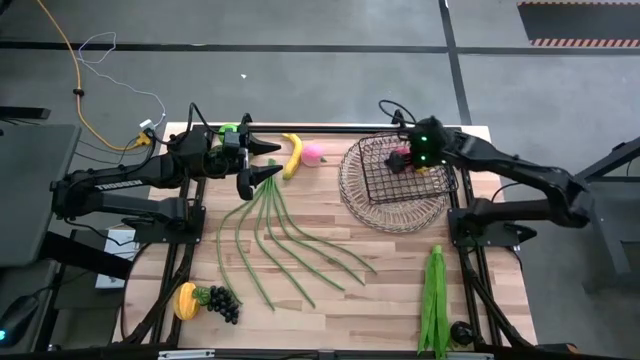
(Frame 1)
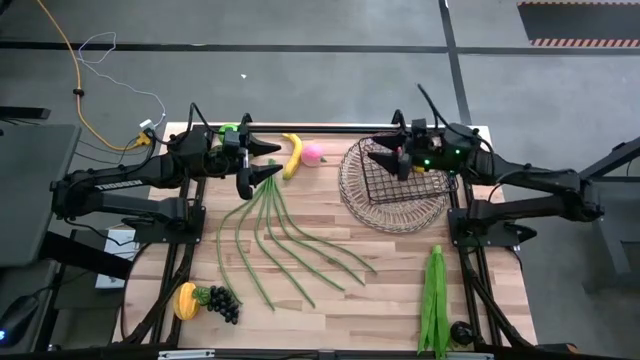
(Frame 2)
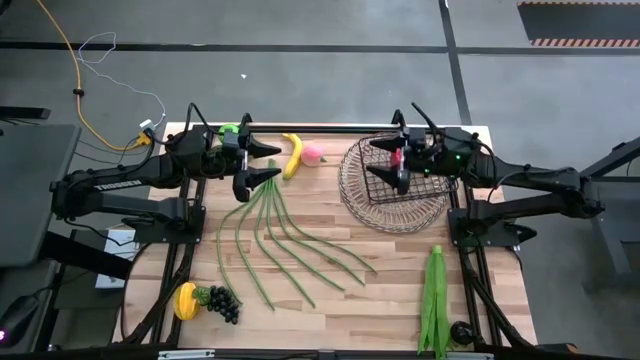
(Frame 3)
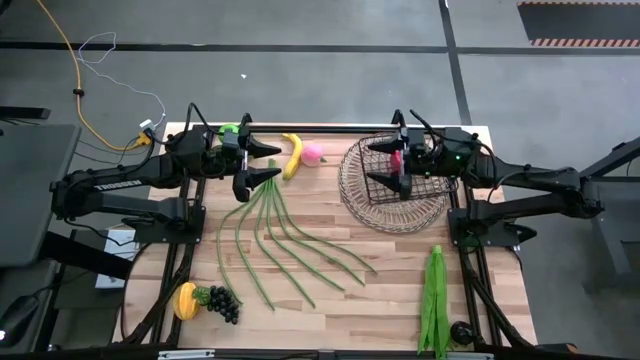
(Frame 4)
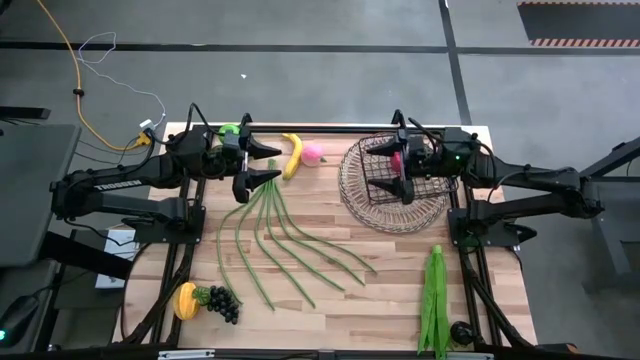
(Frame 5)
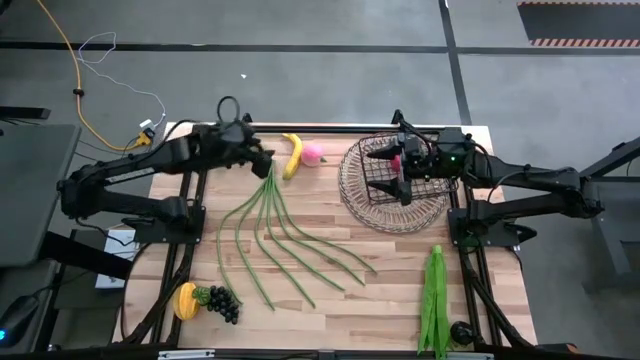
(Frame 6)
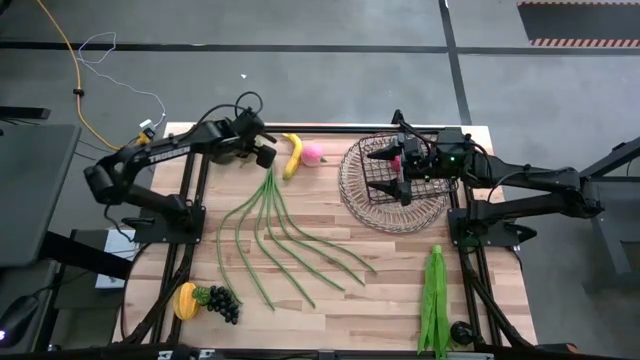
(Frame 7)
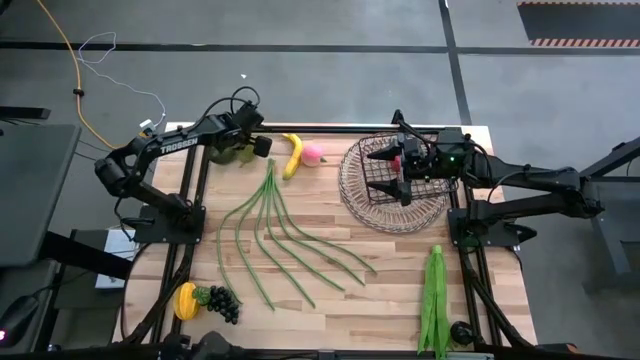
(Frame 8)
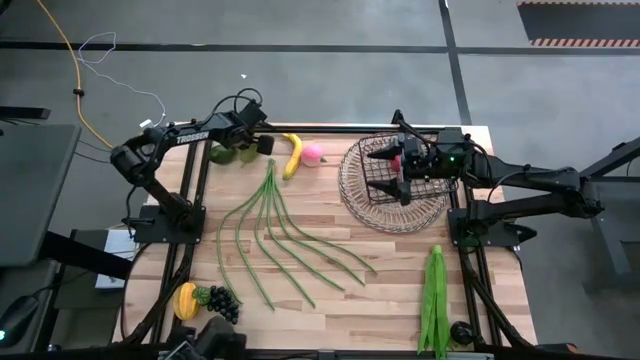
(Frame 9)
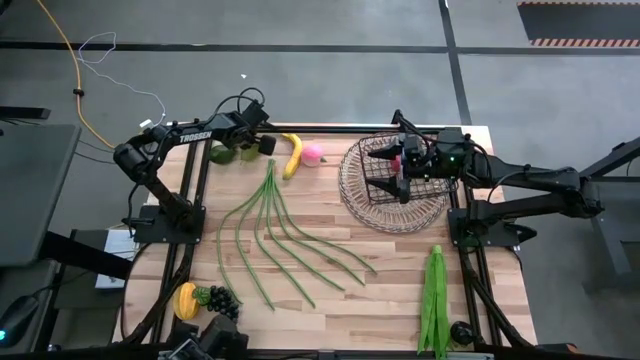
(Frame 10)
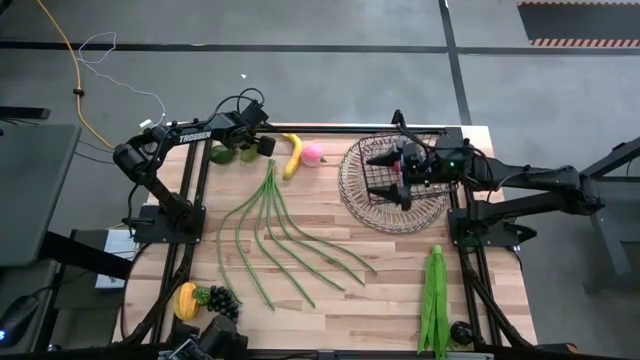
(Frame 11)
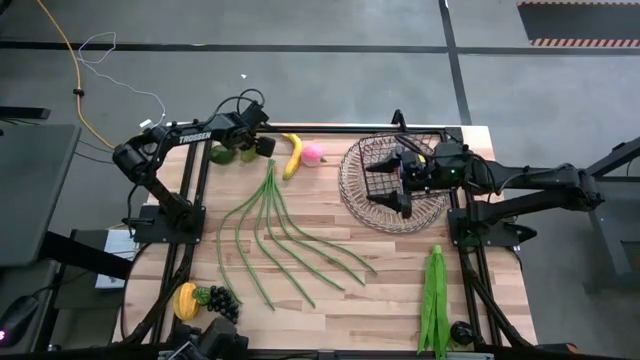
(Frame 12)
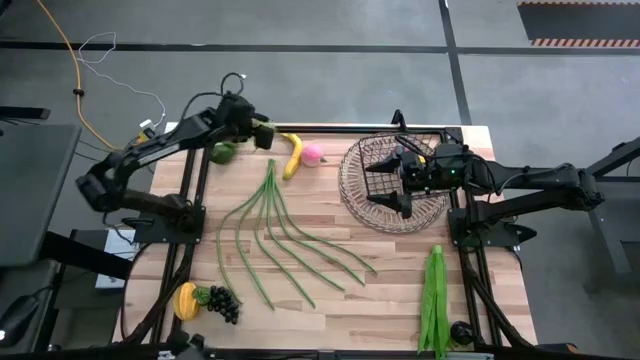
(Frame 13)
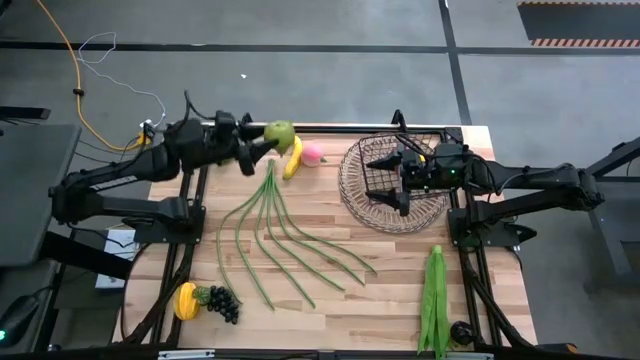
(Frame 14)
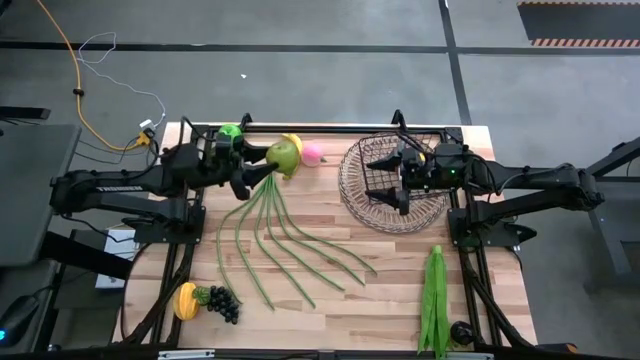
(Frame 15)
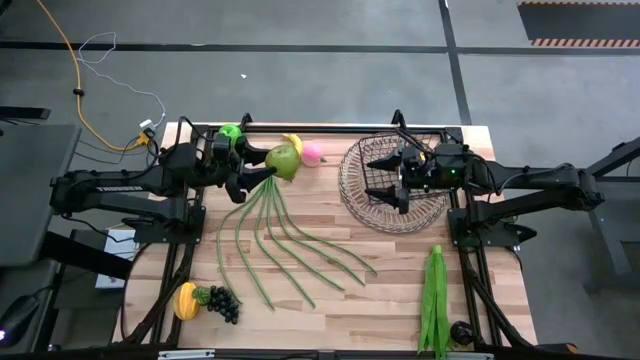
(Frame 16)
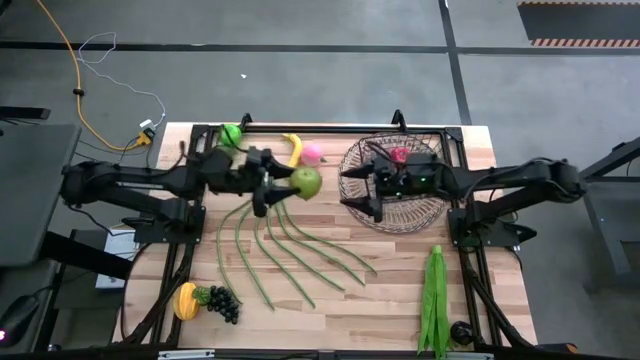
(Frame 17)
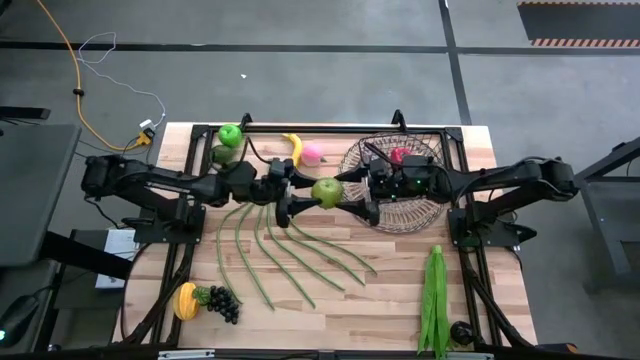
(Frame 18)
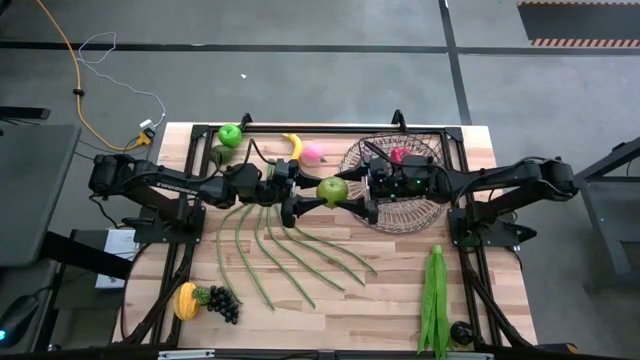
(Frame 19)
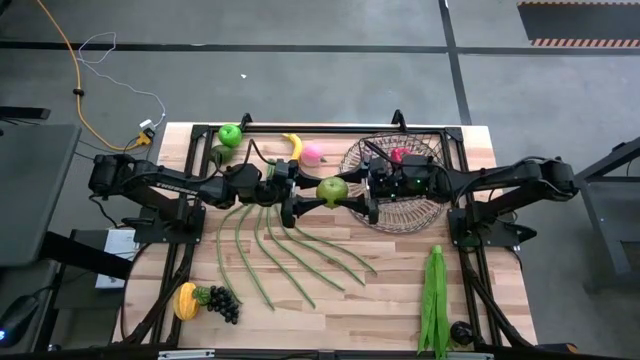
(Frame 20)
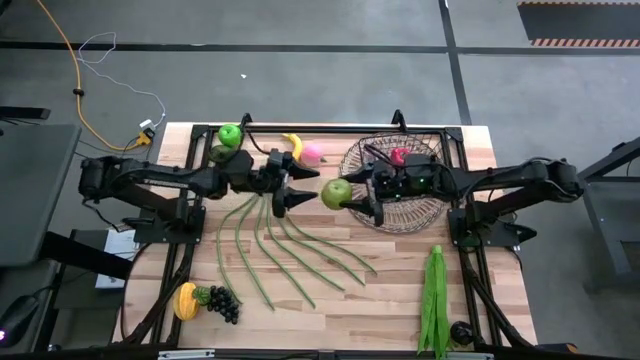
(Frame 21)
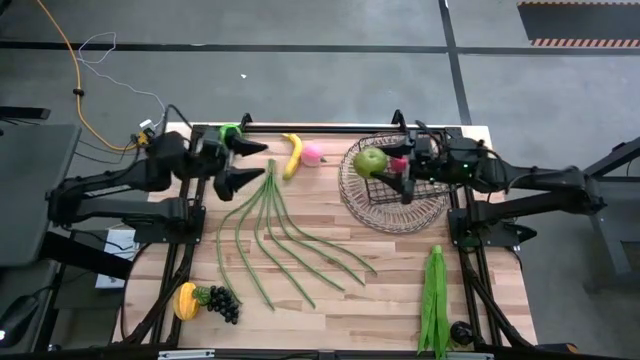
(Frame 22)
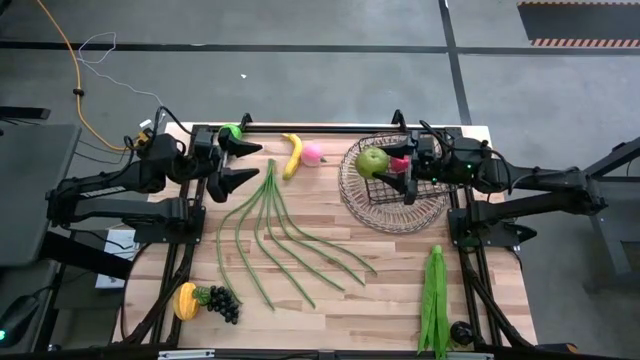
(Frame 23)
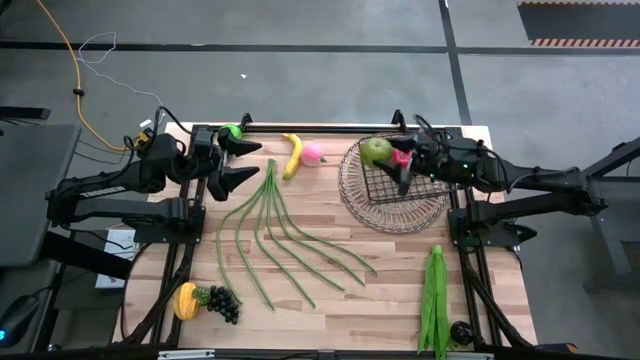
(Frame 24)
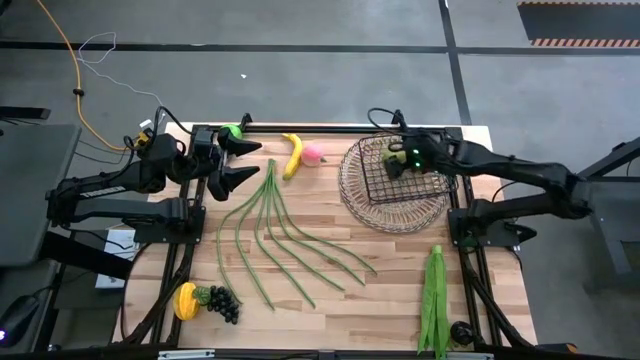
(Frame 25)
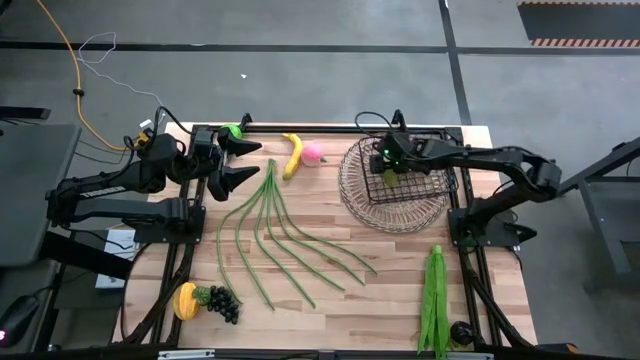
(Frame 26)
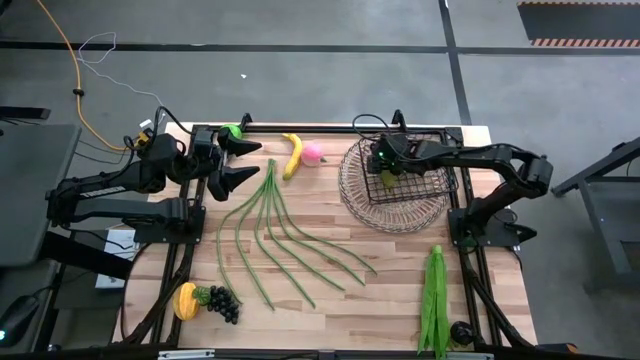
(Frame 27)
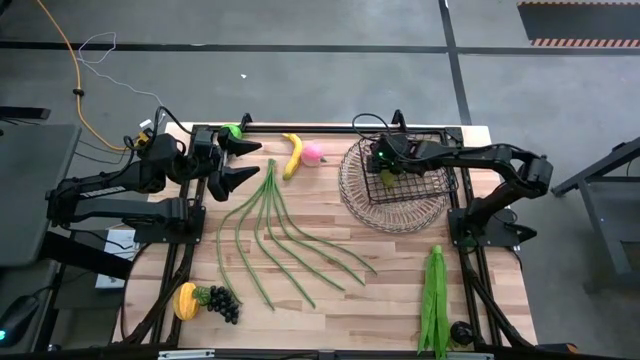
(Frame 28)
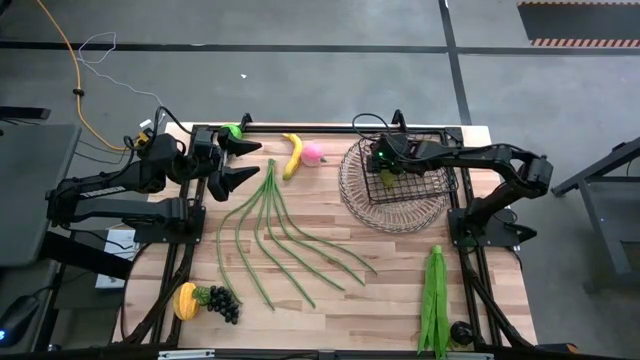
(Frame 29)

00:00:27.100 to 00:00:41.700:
Task: Build produce basket
Put the green pear into the wire basket

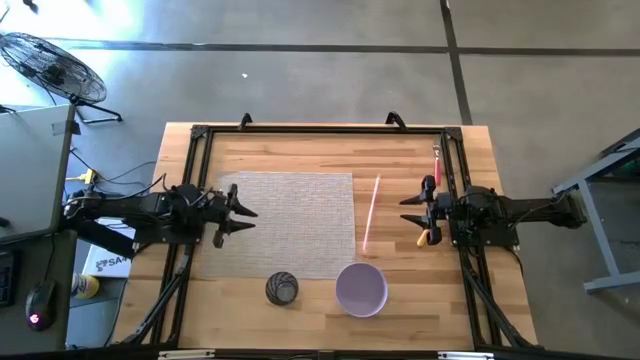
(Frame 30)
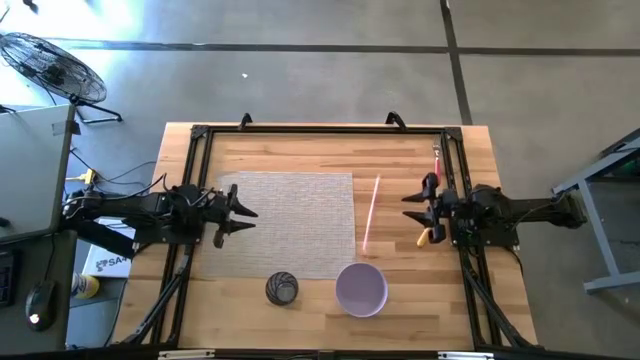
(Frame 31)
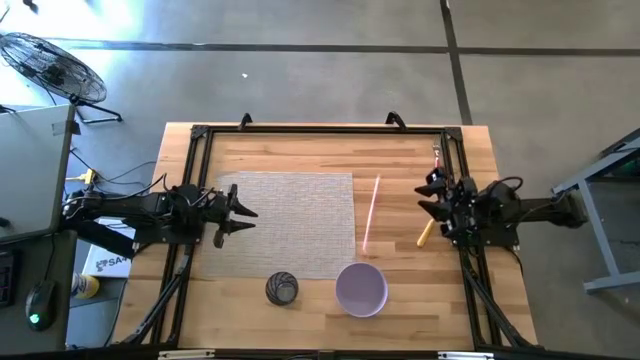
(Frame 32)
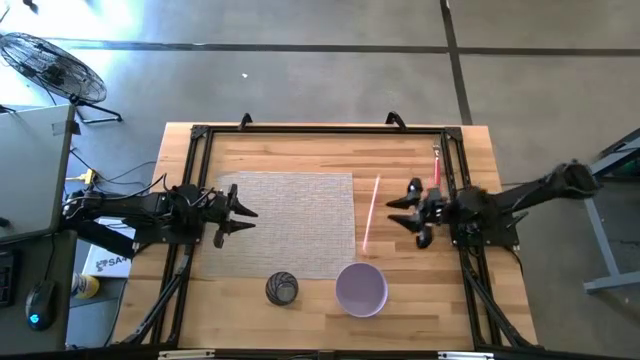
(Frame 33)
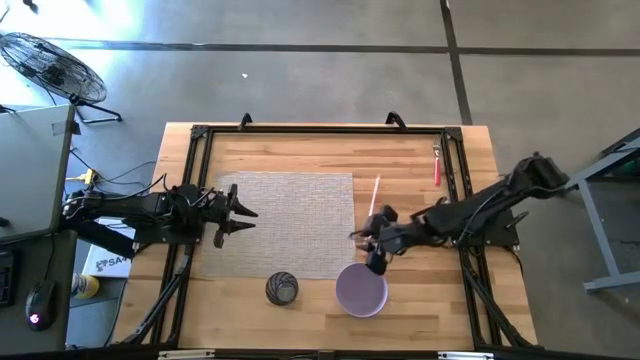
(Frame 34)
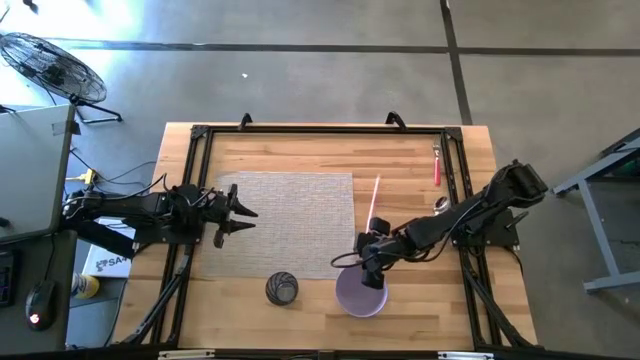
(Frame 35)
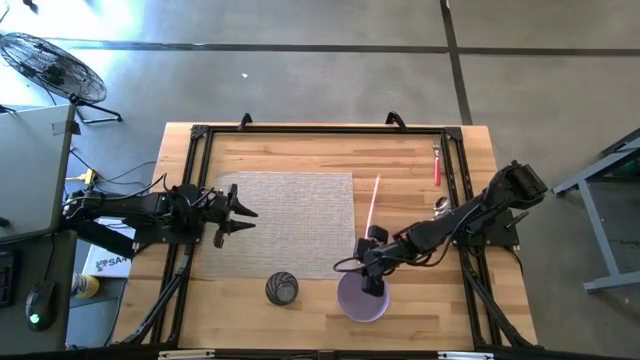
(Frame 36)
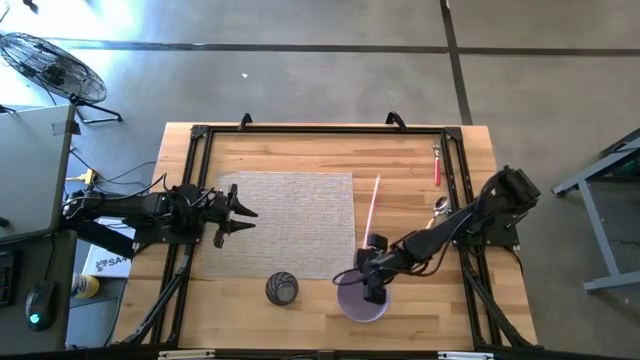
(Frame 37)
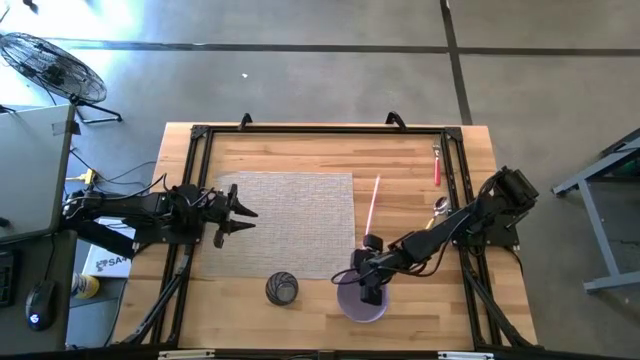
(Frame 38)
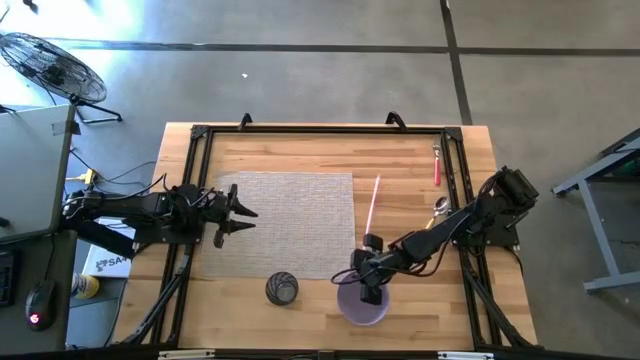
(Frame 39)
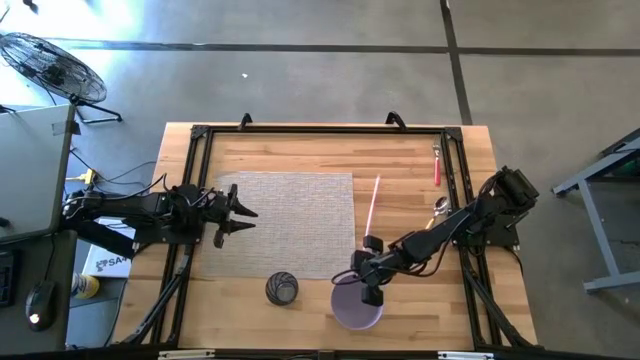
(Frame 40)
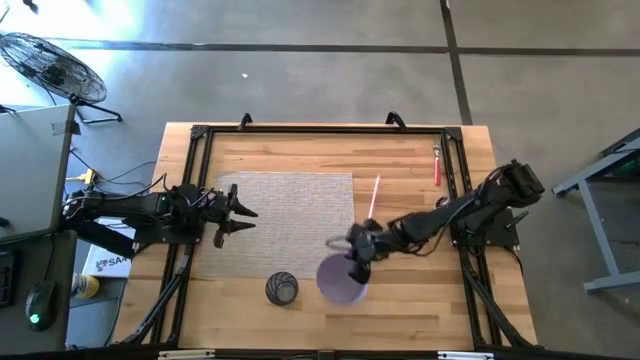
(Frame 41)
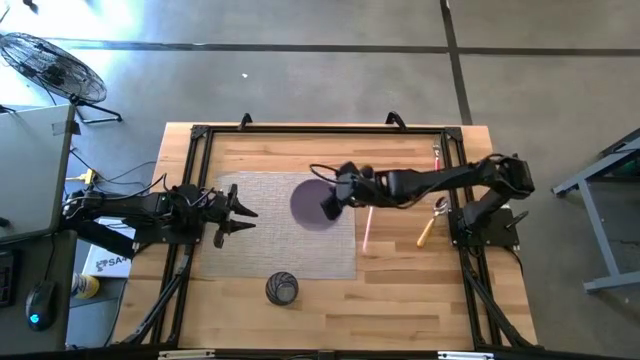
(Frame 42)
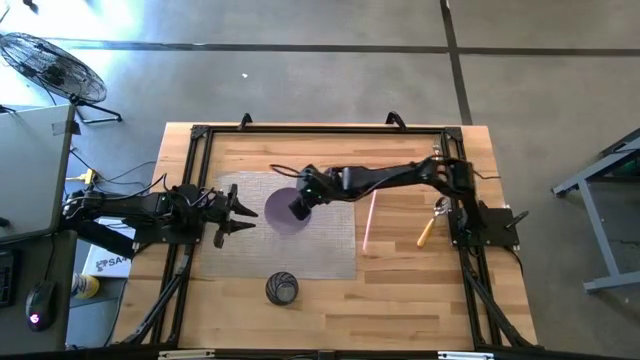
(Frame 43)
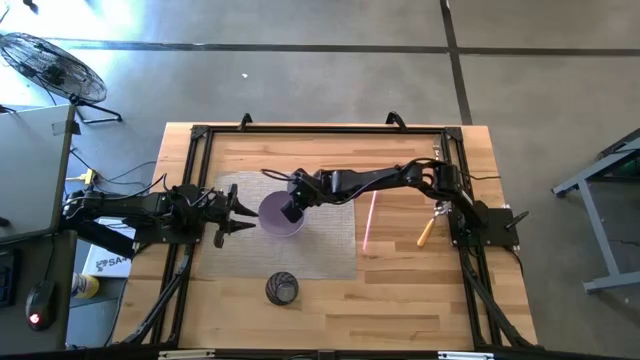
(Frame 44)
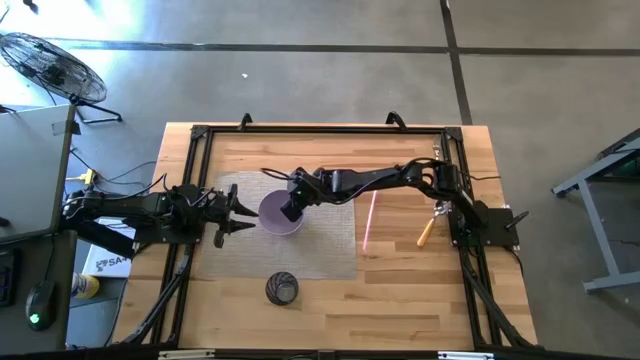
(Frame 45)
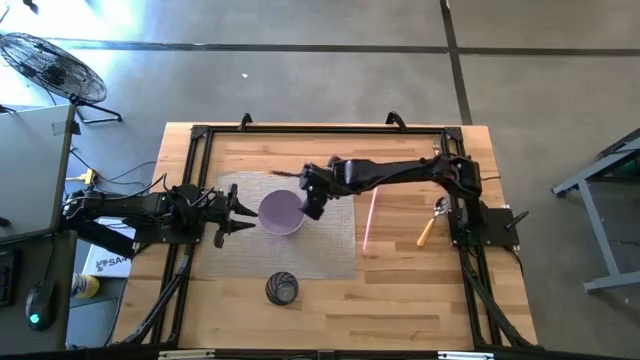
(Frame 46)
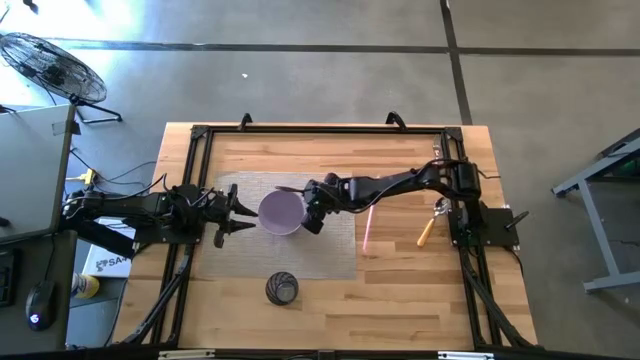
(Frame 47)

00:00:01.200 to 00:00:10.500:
Task: Pick & Place Utensil
Put the purple bowl on the gray placemat
